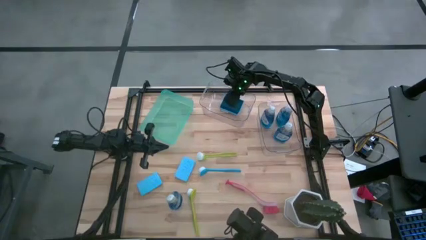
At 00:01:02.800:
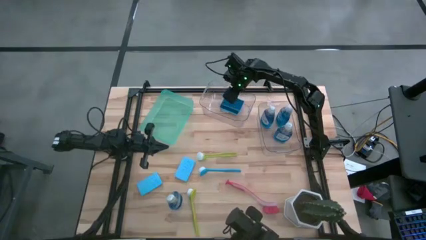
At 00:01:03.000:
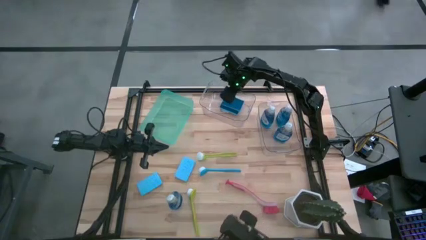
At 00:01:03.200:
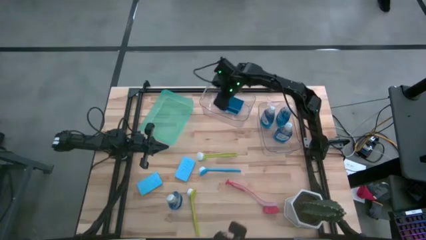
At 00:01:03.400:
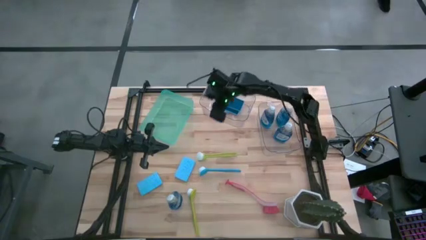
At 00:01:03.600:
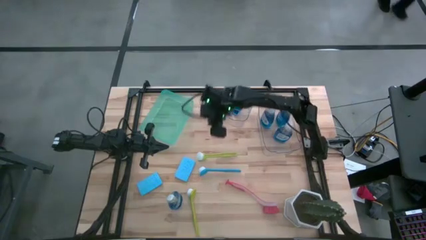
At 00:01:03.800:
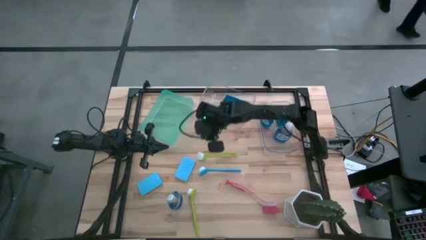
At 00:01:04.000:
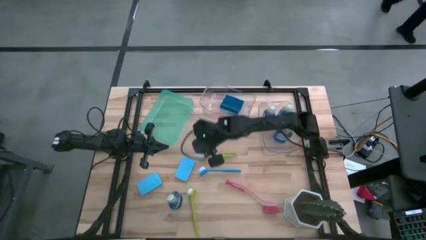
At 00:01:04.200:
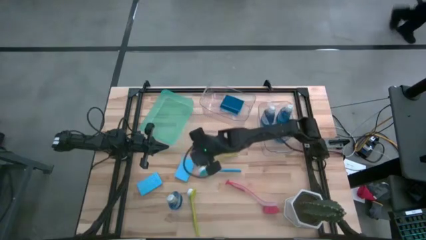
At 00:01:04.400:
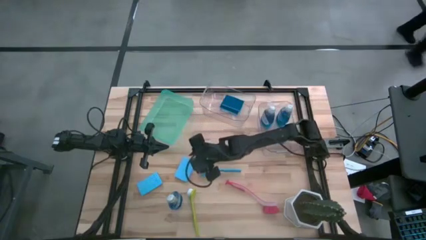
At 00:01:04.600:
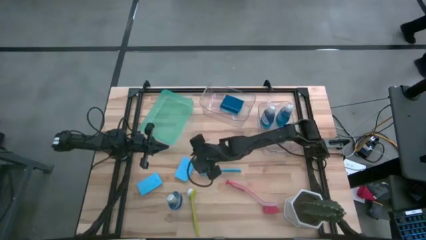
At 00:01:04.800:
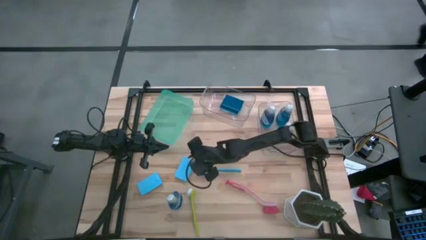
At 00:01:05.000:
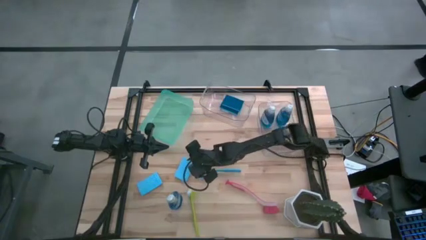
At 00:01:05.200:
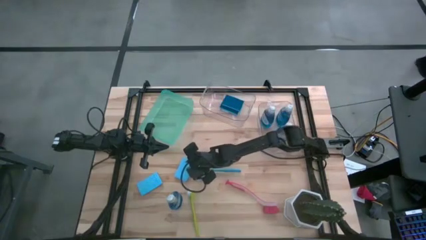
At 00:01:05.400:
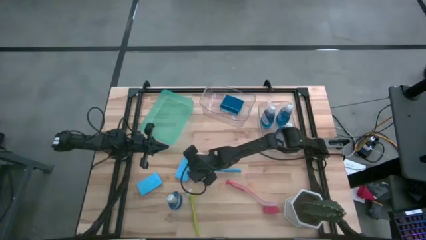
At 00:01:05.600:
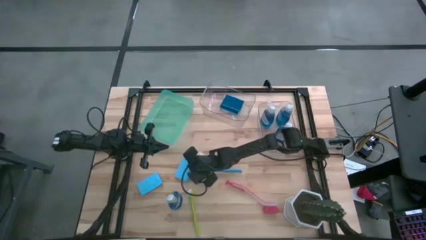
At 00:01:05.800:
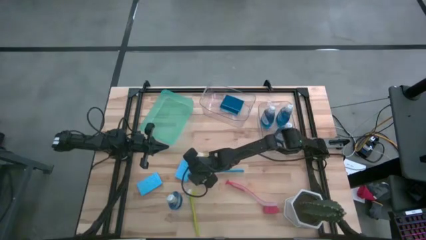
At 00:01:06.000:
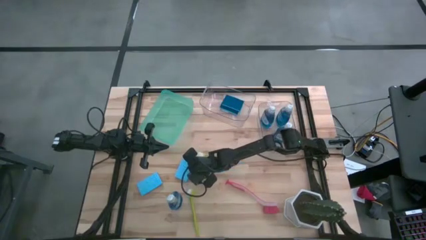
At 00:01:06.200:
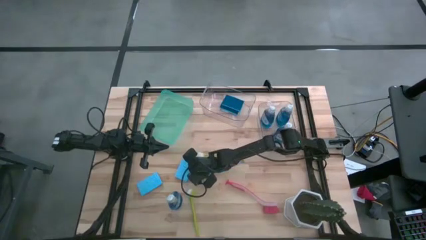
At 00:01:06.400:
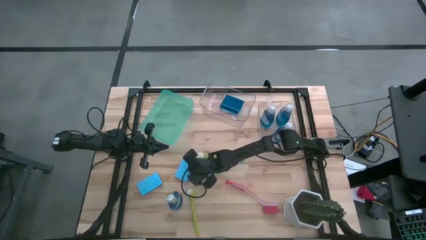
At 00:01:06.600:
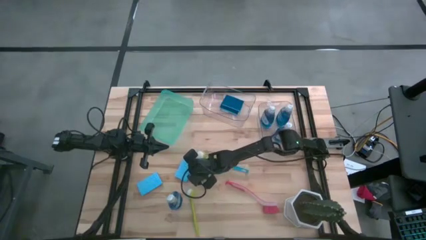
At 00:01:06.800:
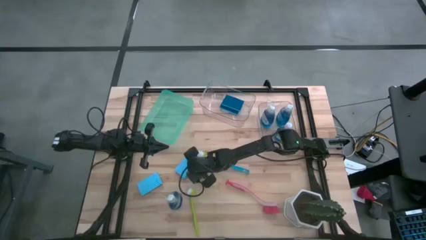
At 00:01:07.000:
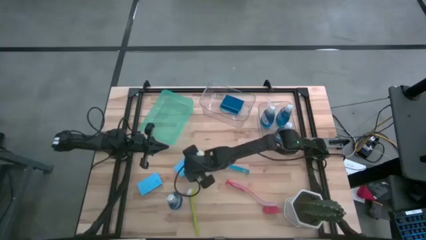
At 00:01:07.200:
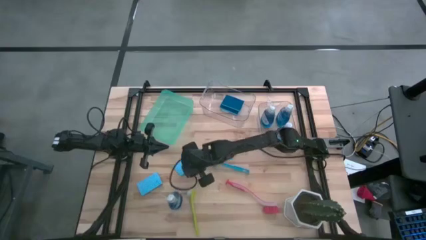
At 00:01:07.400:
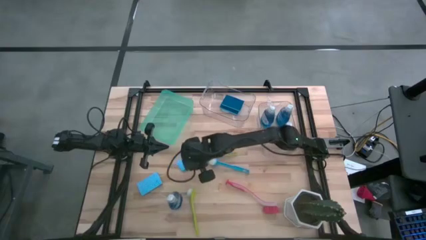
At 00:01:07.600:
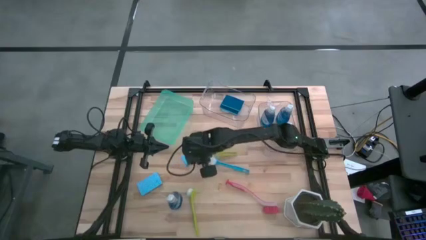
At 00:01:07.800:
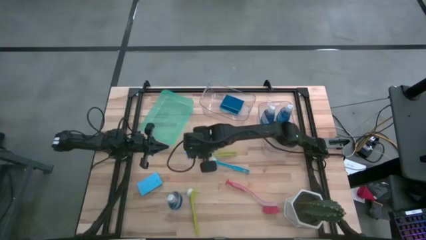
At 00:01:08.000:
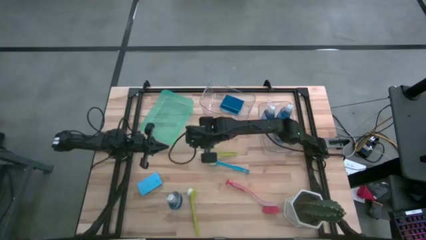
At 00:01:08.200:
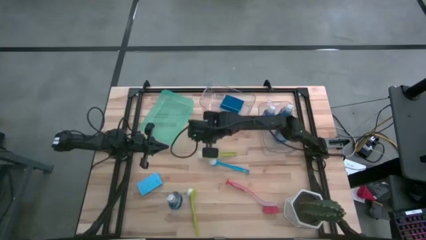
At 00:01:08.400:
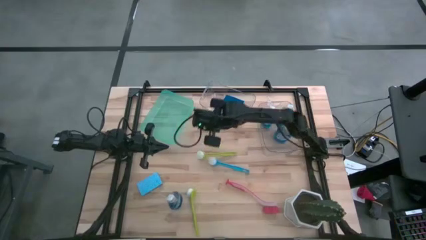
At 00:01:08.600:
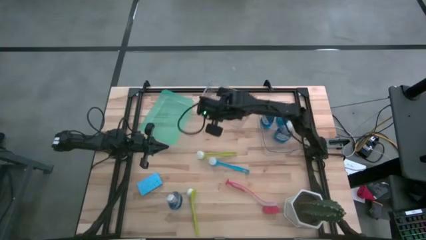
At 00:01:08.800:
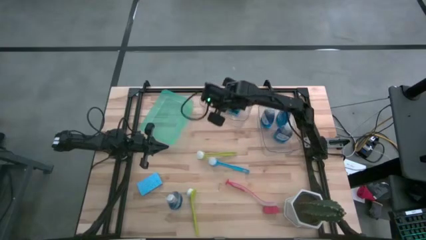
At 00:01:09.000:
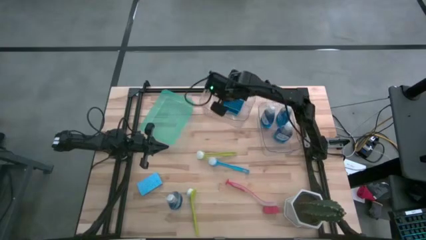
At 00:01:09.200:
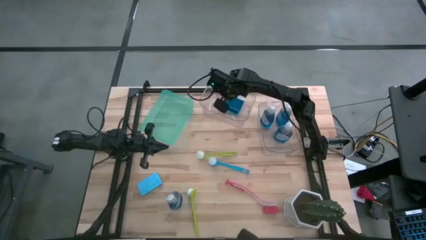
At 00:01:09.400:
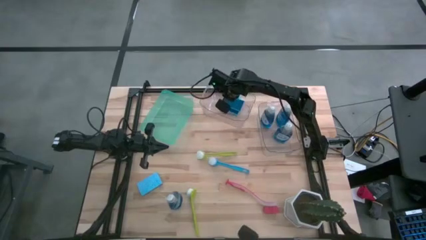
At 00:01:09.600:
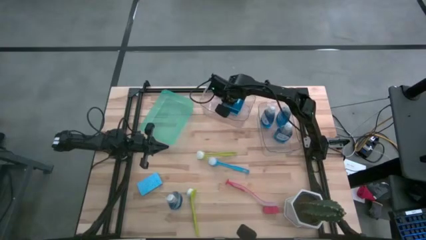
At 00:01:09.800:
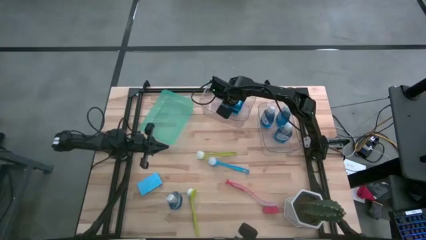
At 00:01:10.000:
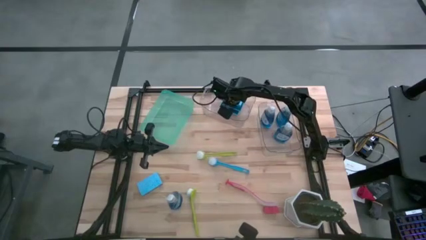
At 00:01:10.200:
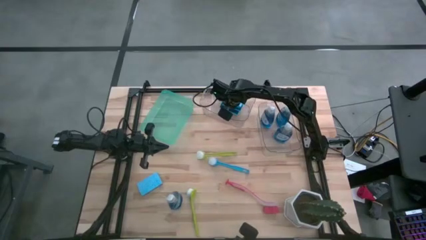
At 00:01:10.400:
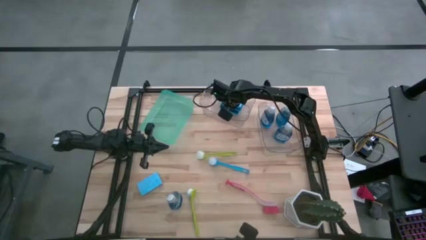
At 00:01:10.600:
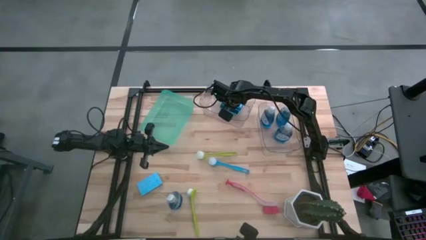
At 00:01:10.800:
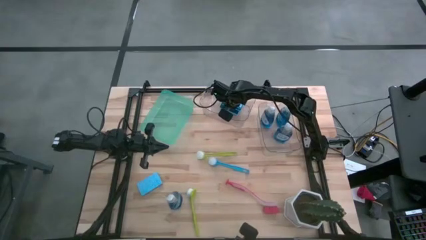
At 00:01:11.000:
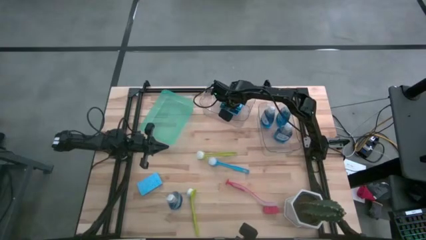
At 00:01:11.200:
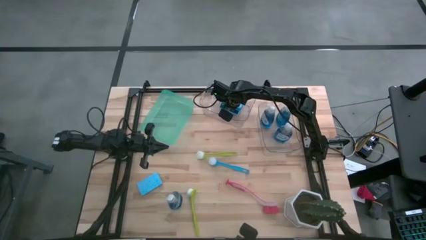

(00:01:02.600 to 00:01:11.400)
Task: Pick & Place Kitchen Sink Supplies
Put the blue sponge wipe into the left transparent bin
